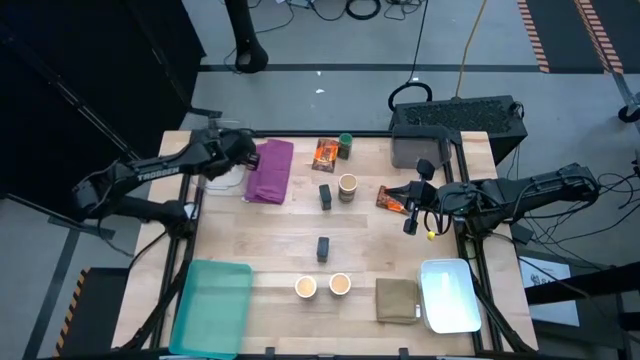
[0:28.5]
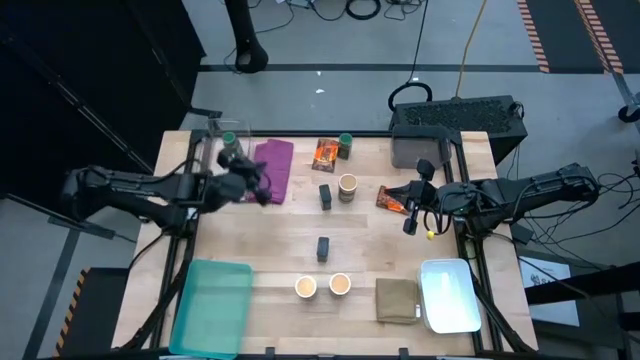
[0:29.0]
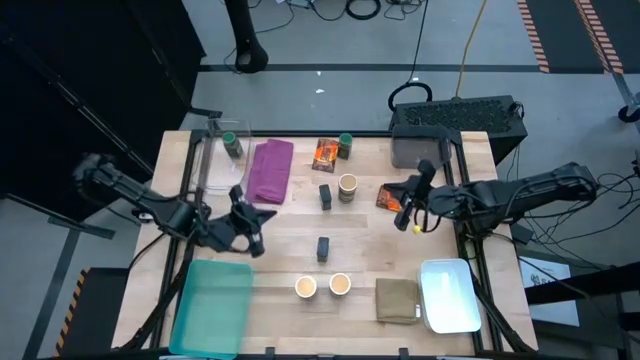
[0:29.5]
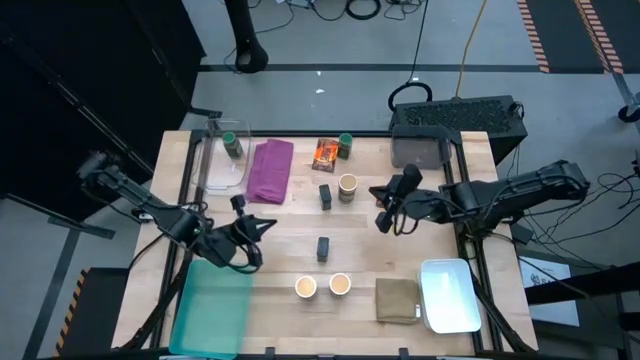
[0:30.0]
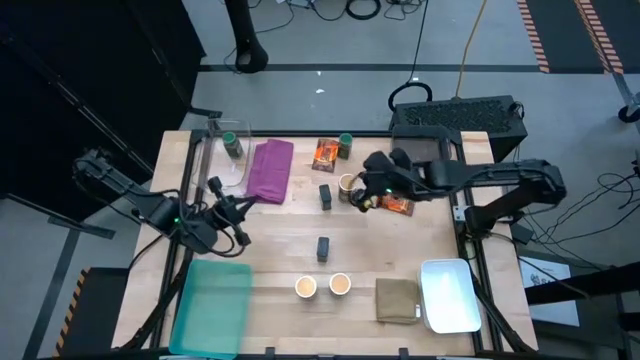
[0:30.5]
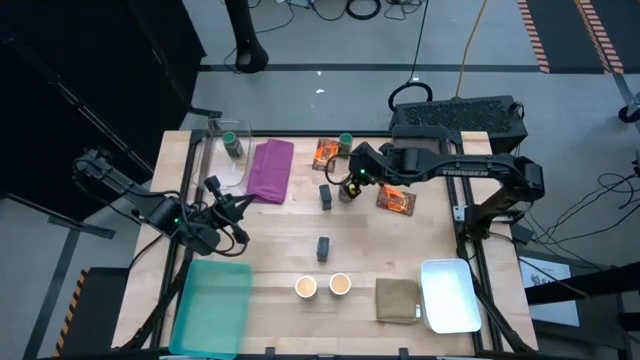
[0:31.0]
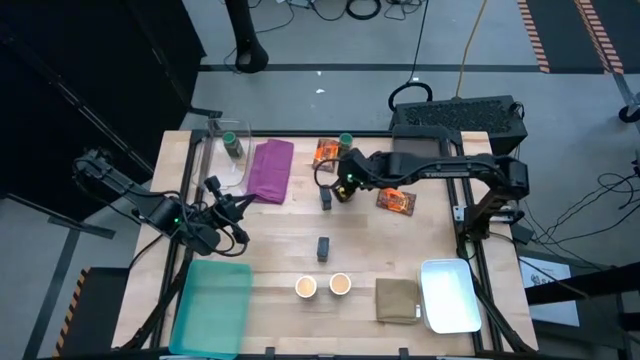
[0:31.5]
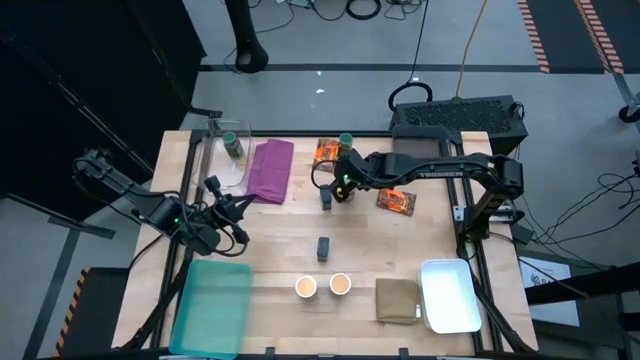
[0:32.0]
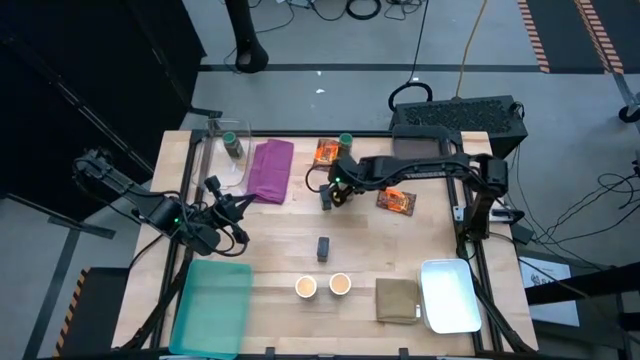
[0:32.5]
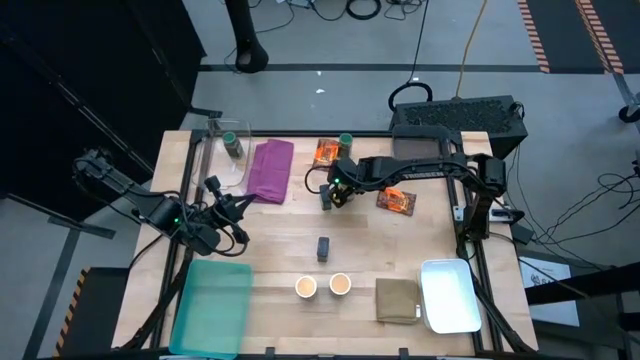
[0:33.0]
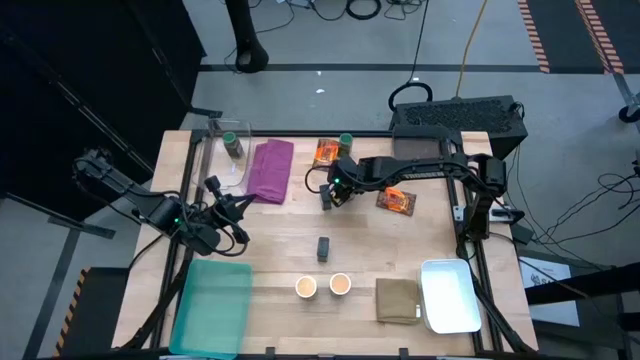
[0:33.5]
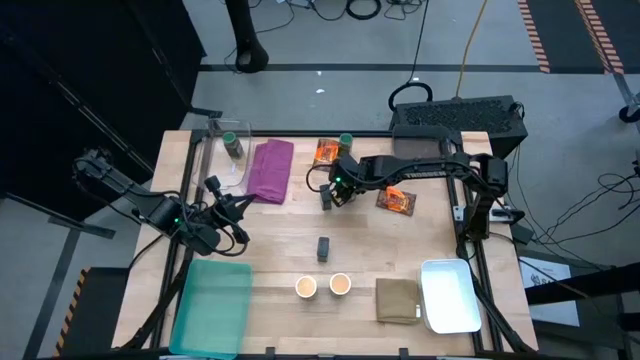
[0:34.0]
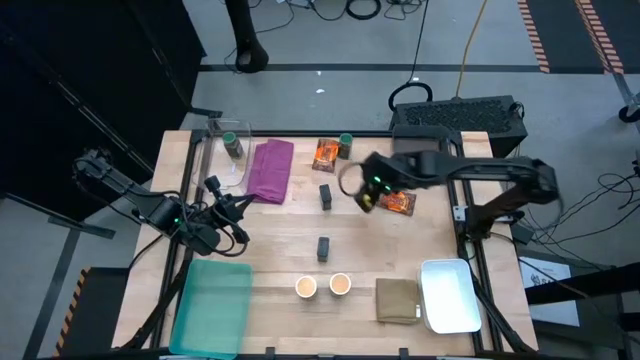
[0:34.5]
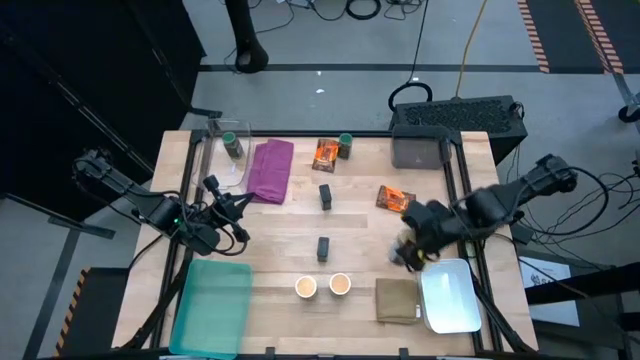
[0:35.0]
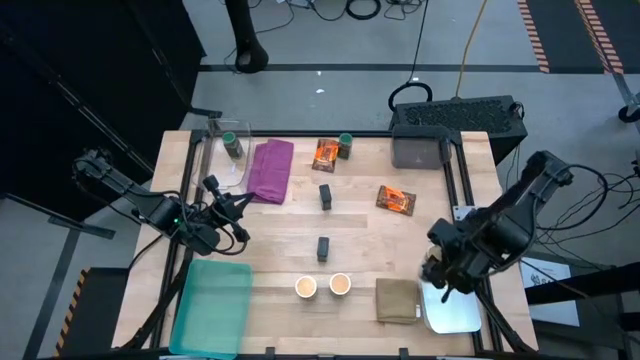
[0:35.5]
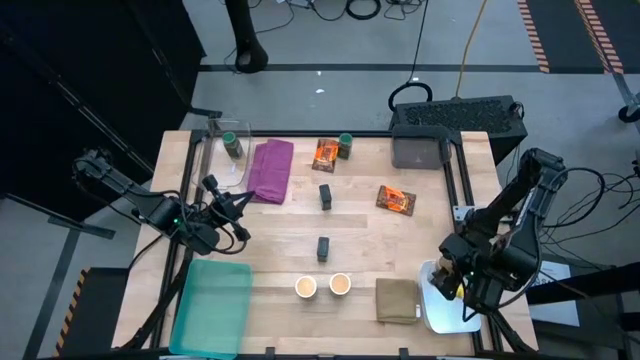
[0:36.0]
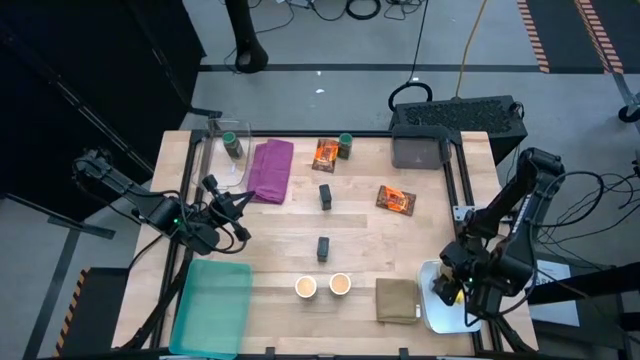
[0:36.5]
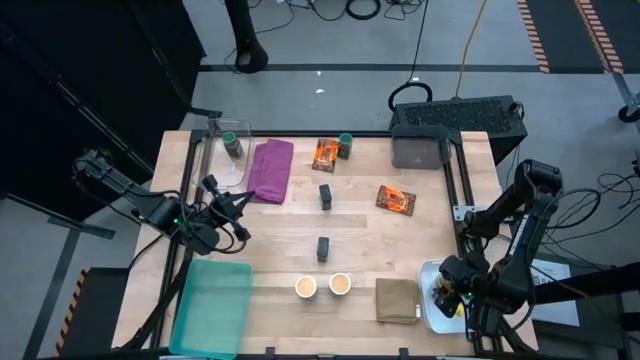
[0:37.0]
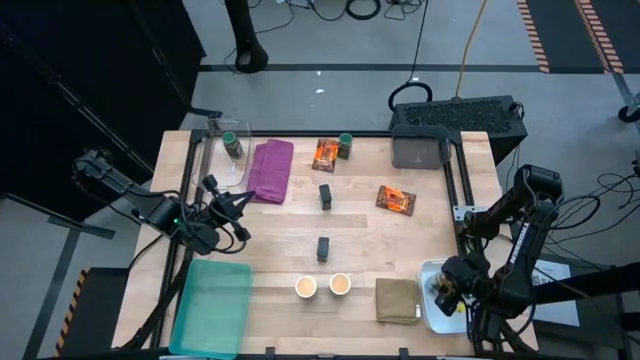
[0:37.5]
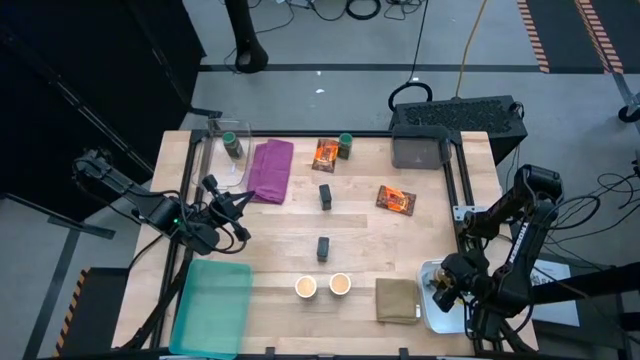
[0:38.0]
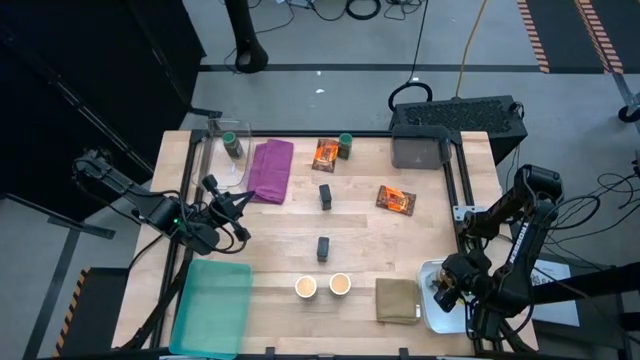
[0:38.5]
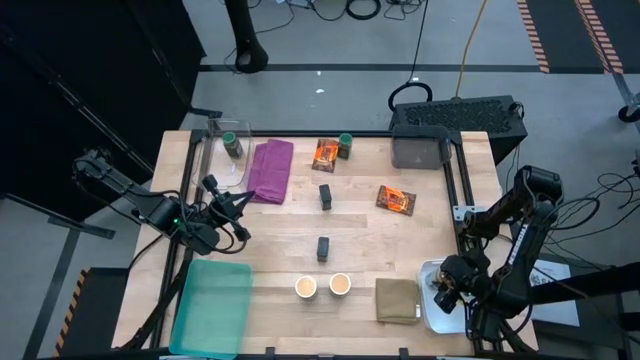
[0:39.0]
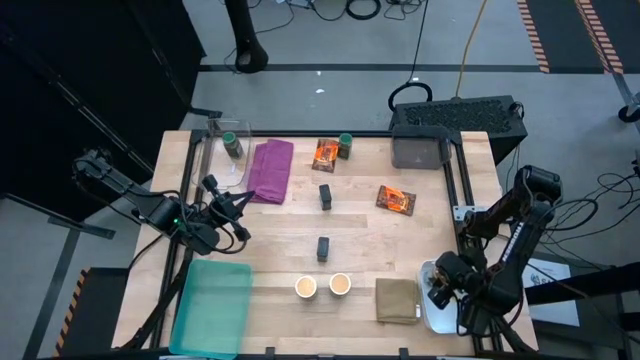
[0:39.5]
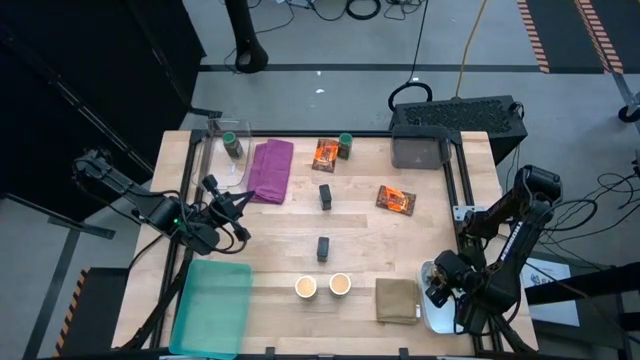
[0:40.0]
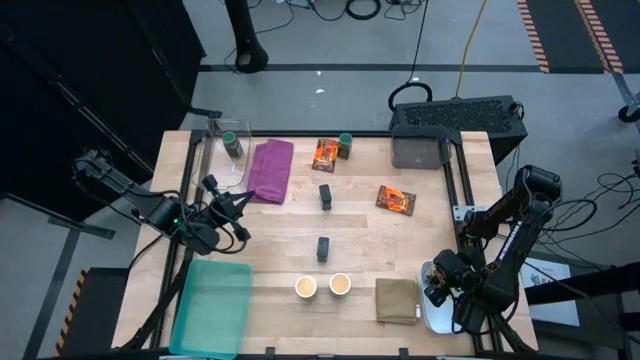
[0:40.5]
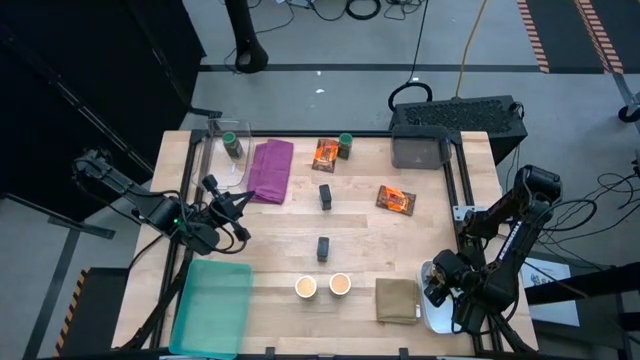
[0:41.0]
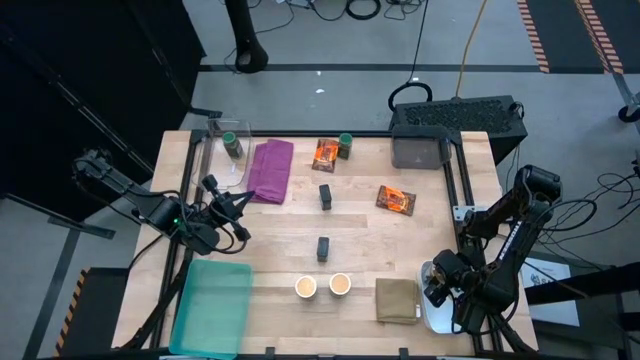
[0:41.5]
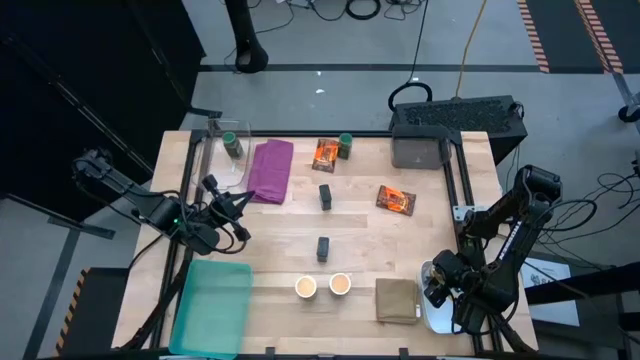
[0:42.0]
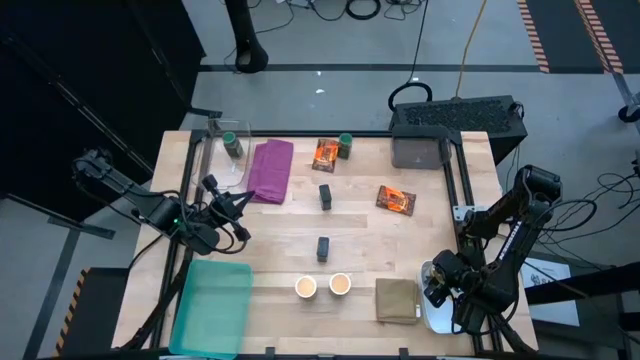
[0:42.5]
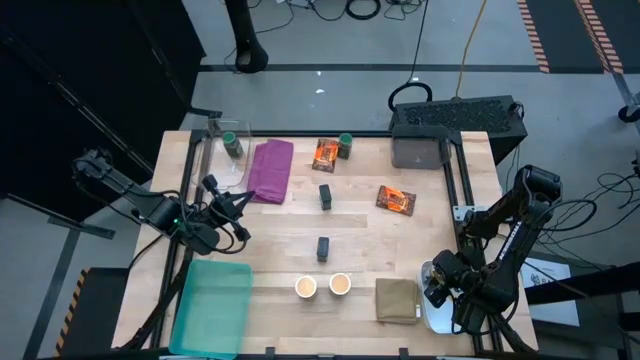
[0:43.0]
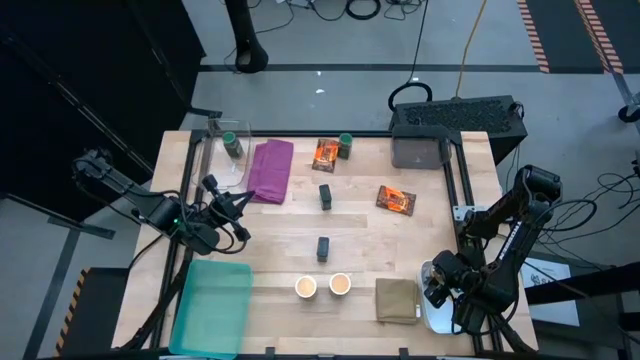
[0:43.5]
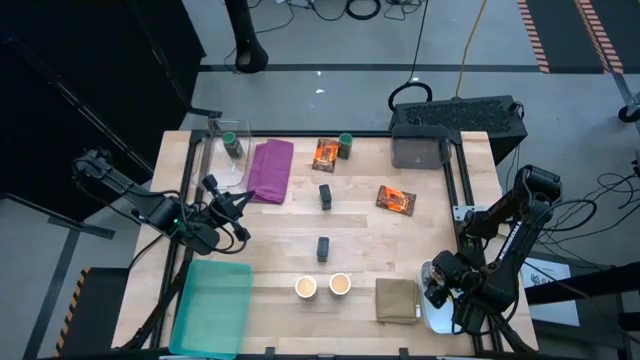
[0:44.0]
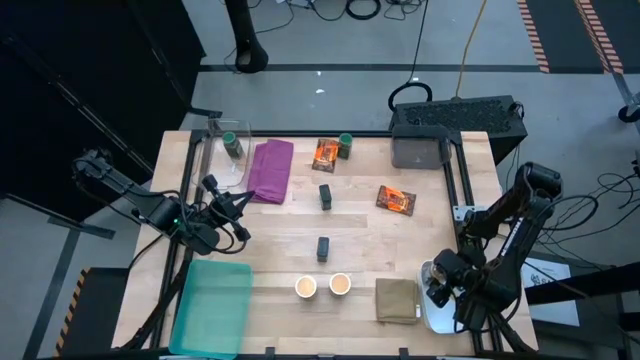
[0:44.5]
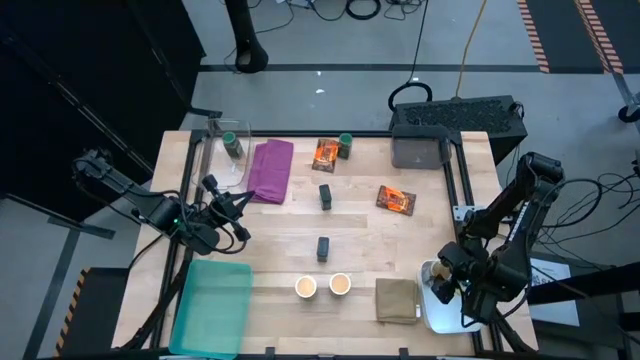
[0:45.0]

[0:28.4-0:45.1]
Task: Sort spices by type
Put the top golden seasoning bottle into the white bin
